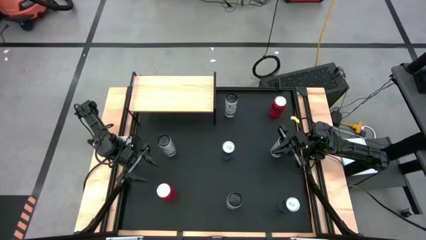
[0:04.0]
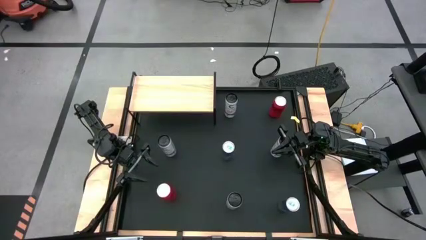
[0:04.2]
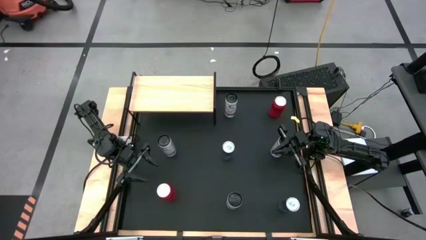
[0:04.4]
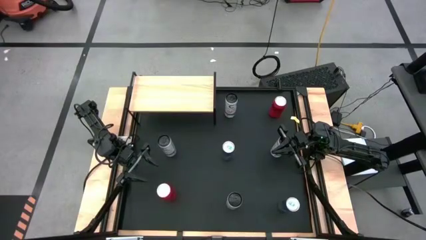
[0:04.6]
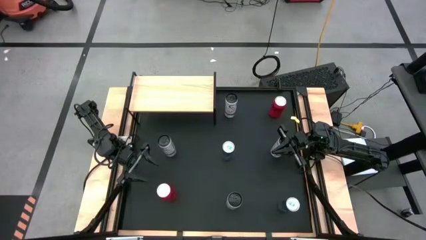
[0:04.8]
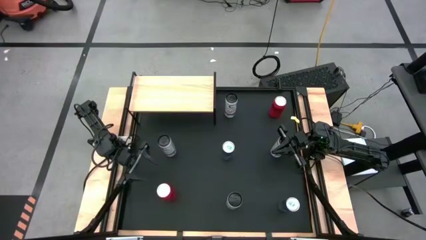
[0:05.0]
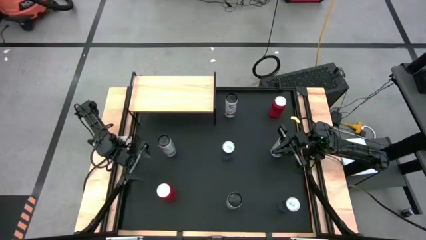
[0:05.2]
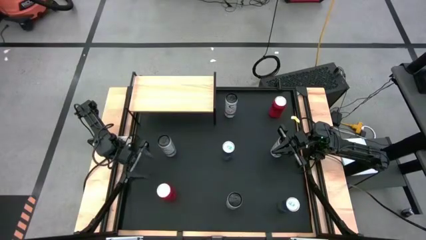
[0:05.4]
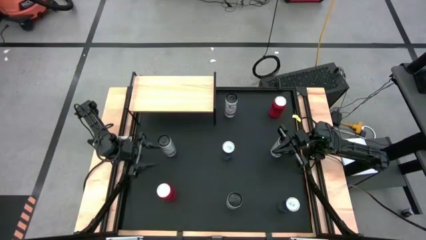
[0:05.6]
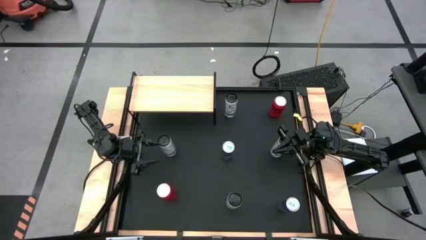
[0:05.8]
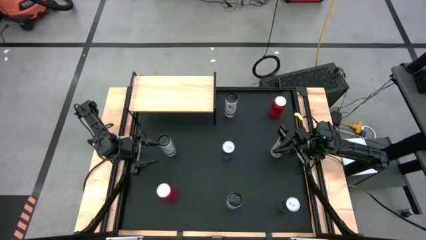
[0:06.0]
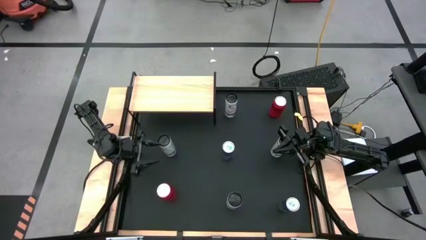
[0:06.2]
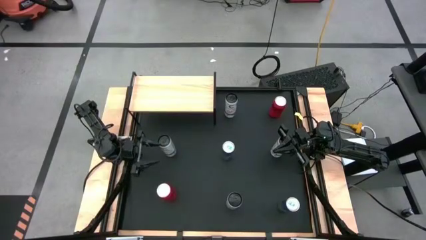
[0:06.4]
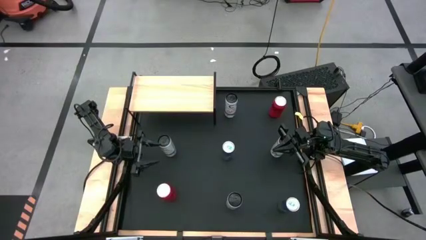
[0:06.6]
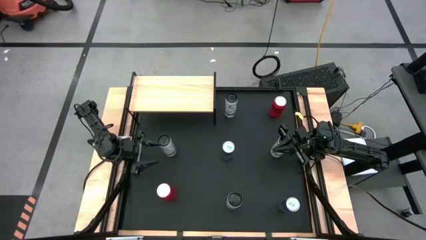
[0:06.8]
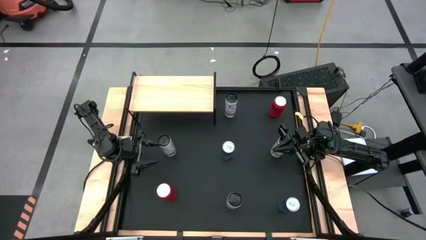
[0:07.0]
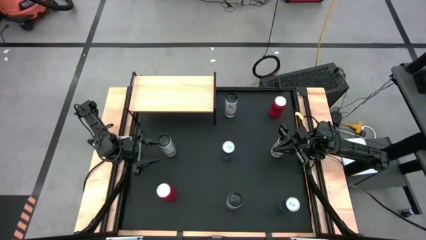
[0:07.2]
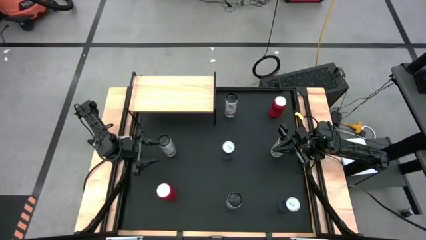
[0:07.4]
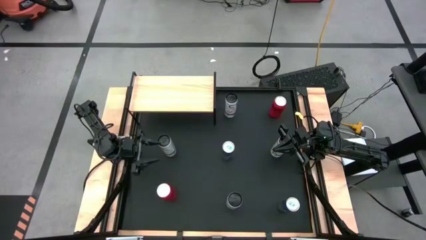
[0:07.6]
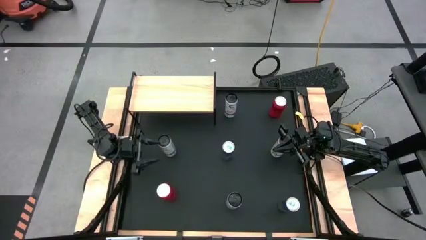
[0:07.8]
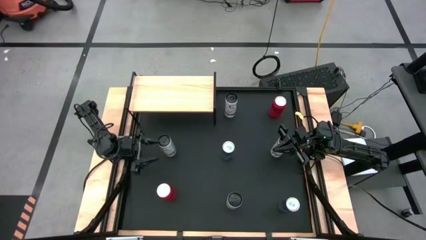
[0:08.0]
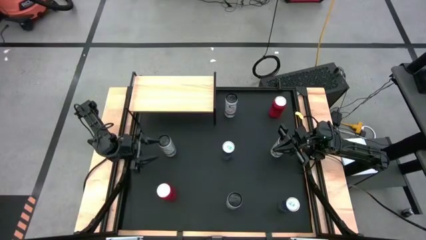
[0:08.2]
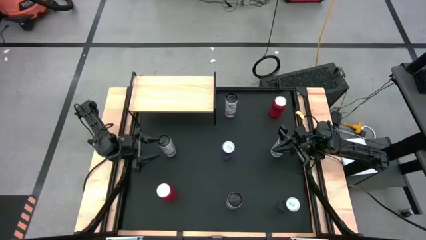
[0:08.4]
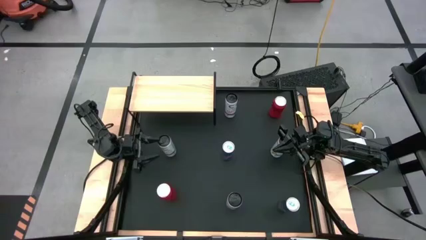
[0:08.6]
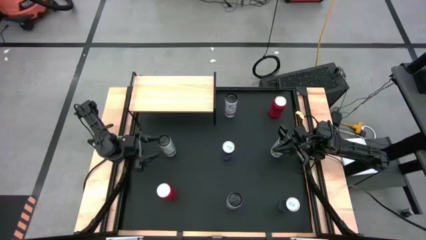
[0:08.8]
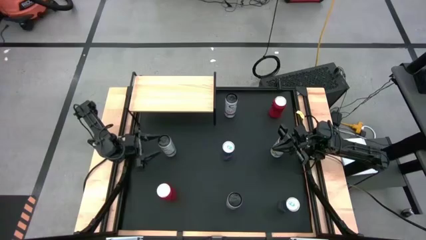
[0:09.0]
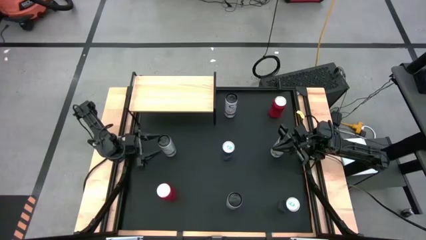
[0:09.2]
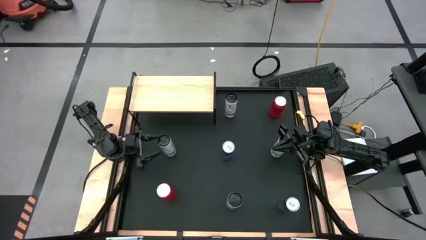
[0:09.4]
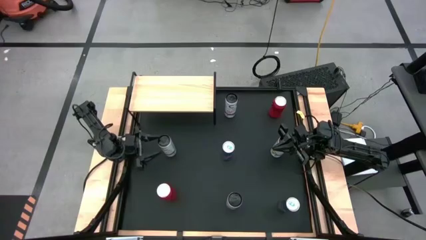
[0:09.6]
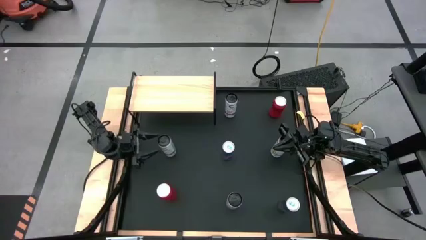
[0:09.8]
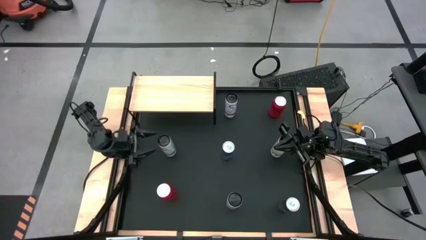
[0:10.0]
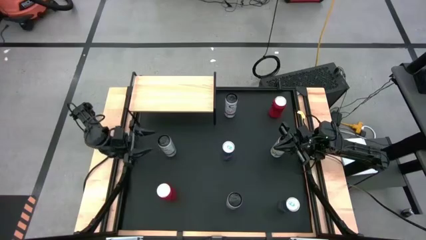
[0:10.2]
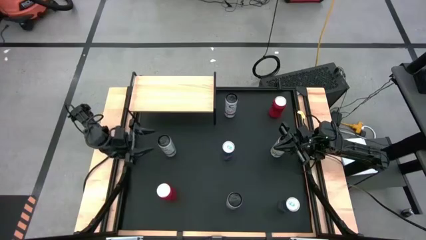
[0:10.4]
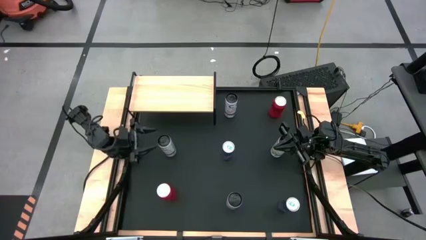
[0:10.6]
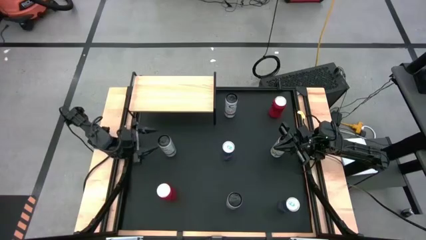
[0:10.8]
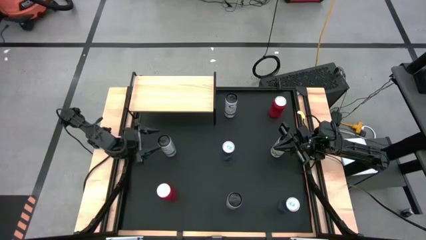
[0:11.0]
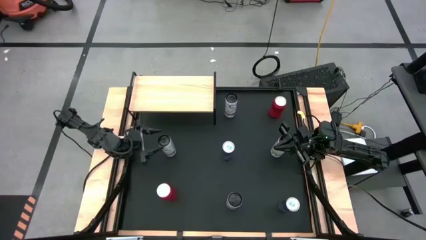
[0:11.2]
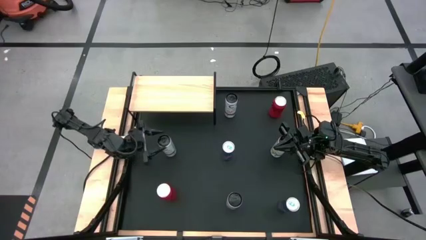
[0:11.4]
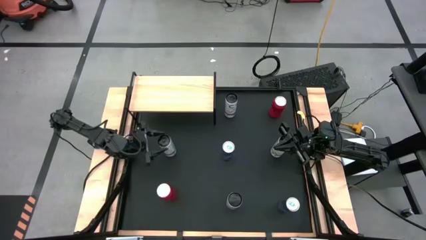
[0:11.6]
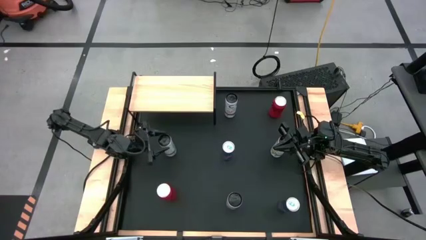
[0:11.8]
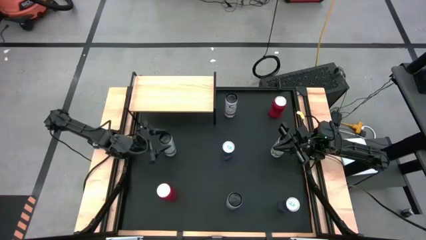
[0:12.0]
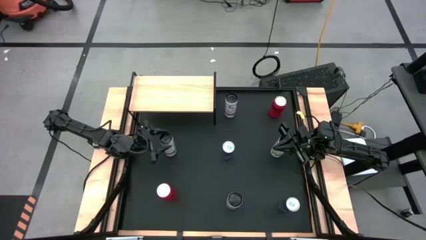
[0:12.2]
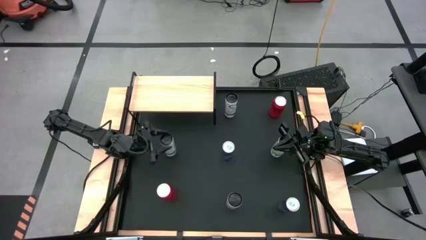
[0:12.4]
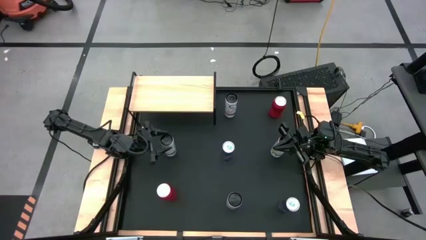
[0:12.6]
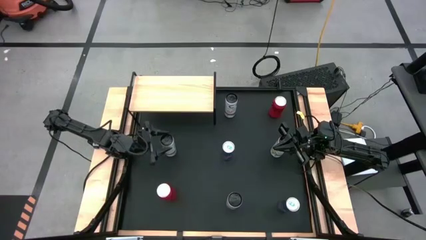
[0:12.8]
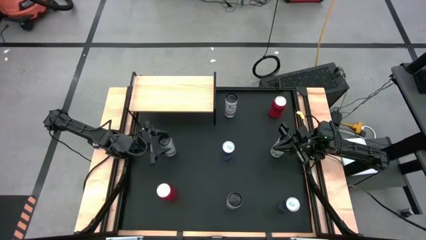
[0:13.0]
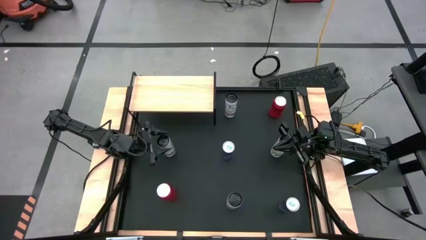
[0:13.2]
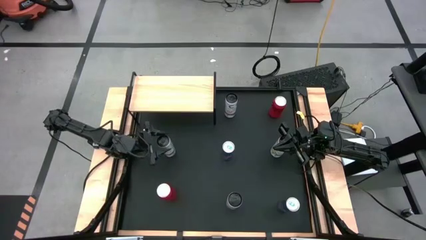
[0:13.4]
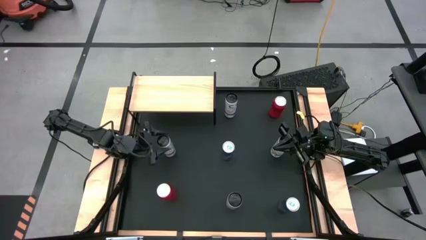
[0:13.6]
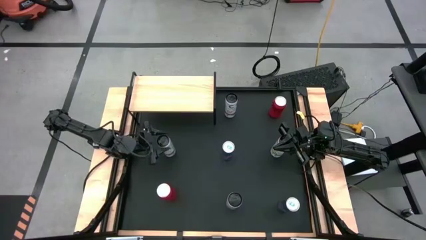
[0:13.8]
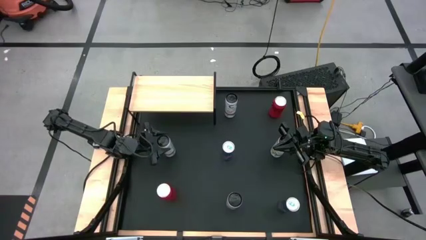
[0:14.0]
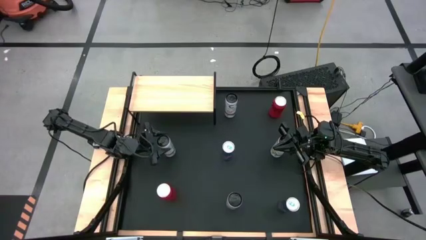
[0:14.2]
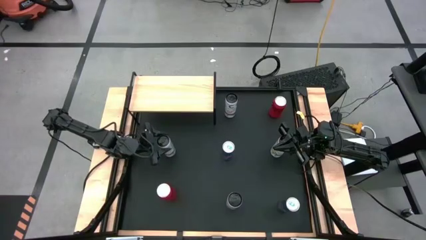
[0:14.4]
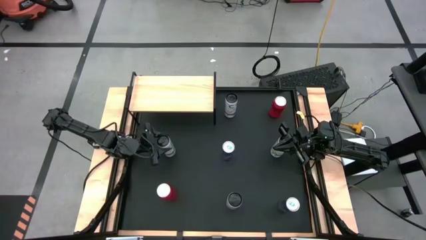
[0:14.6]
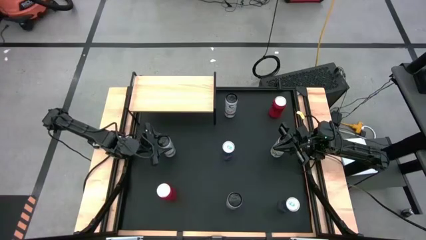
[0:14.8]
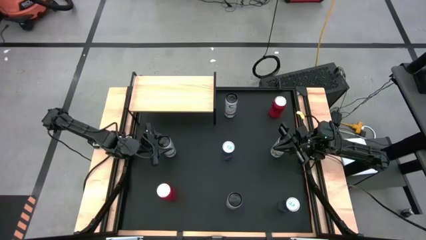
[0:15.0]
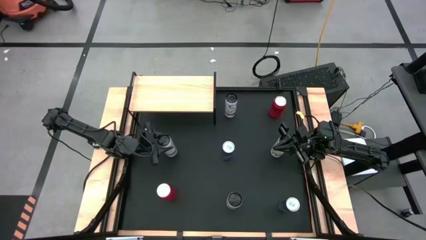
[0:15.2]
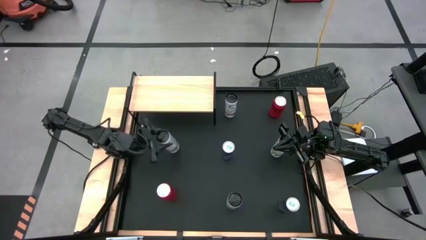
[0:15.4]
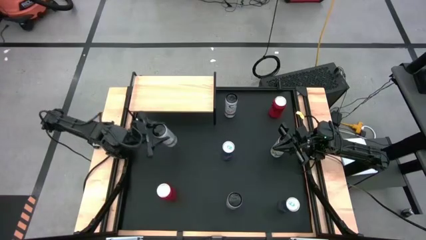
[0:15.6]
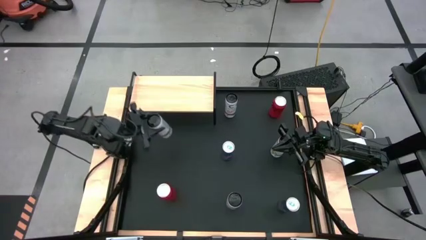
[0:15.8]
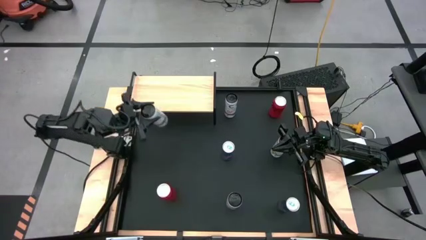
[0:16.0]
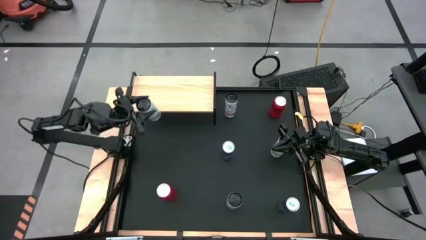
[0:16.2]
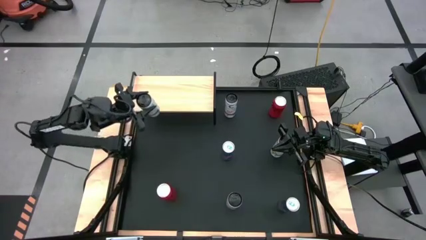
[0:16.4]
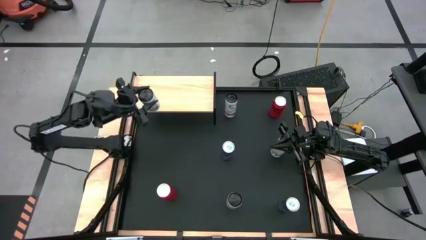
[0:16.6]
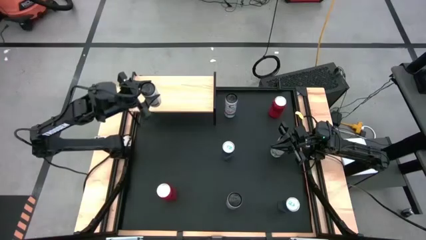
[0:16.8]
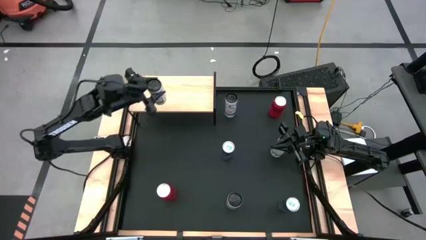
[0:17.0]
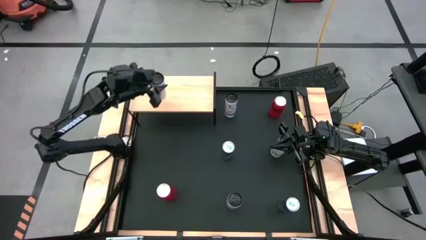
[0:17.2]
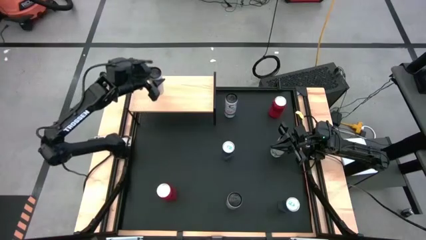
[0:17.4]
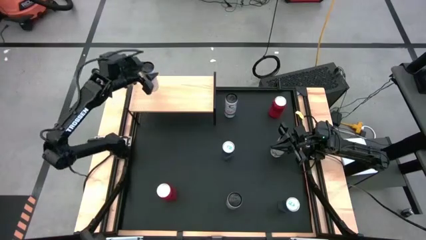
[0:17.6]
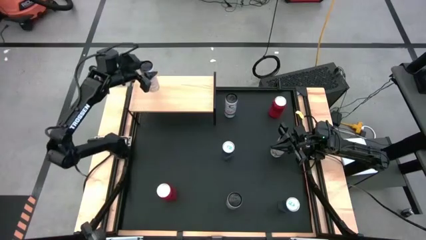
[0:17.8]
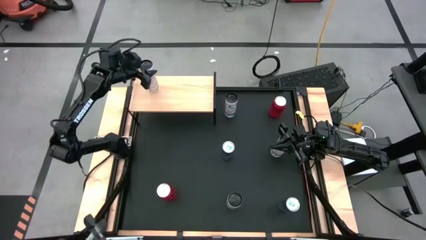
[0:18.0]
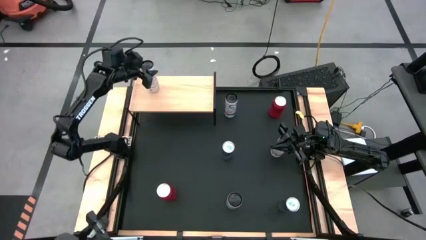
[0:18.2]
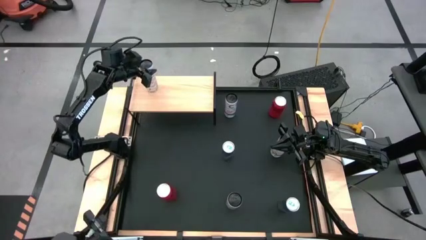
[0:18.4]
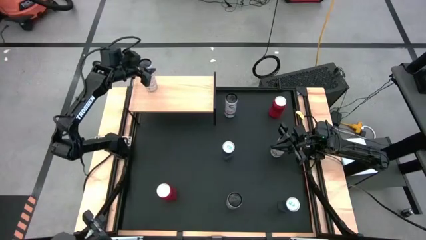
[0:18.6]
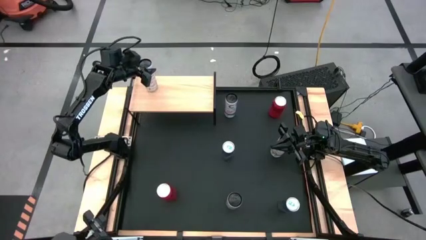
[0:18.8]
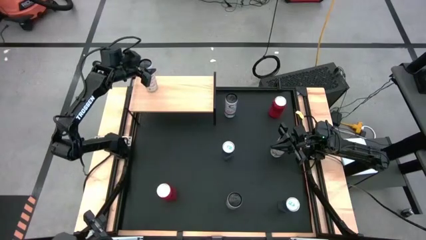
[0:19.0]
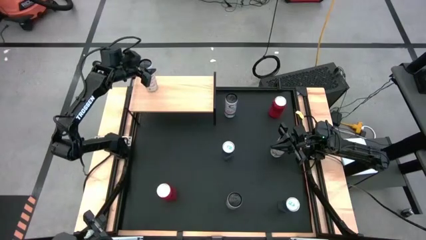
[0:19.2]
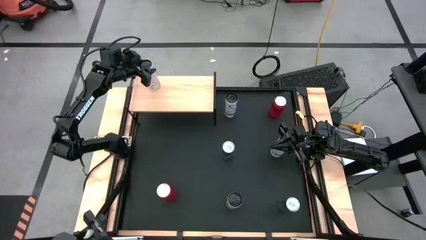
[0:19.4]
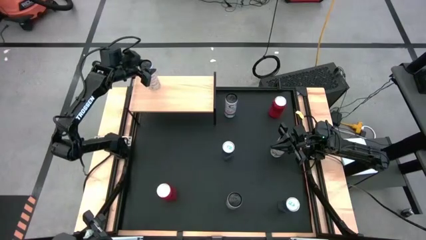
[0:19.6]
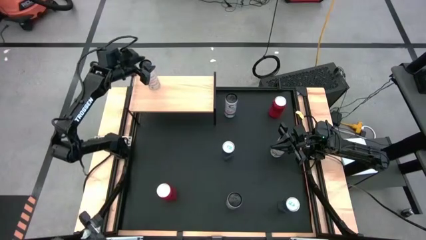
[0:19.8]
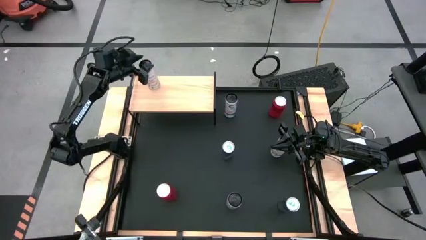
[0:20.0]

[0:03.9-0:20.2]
Task: Place canned beverage on shelf
Put the left white yellow soda can on the shelf
